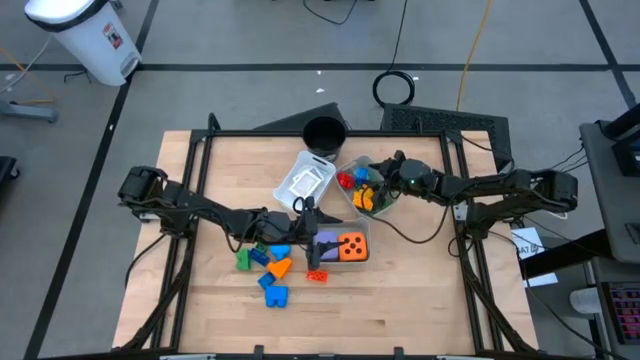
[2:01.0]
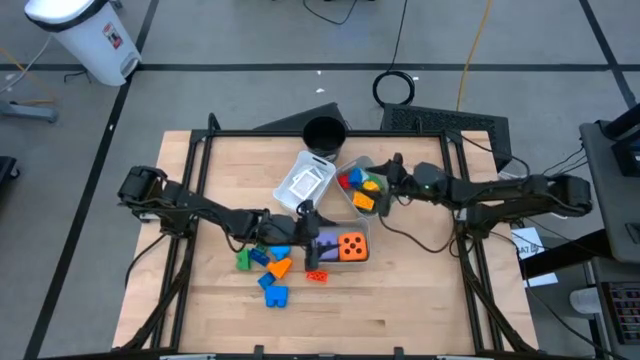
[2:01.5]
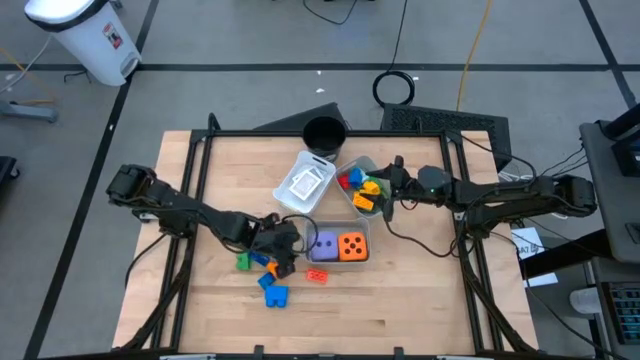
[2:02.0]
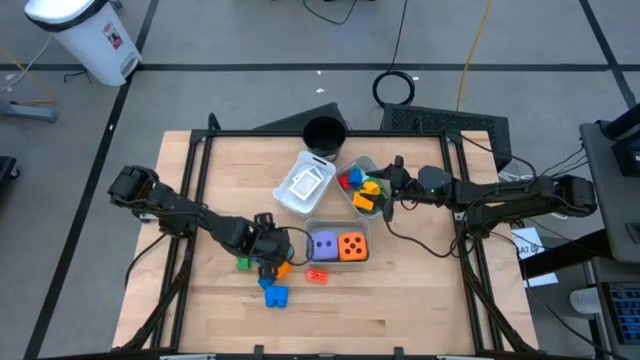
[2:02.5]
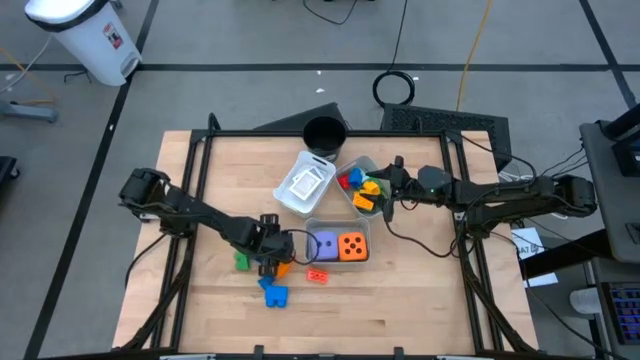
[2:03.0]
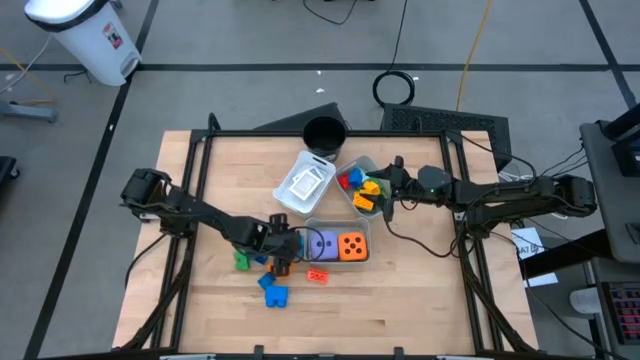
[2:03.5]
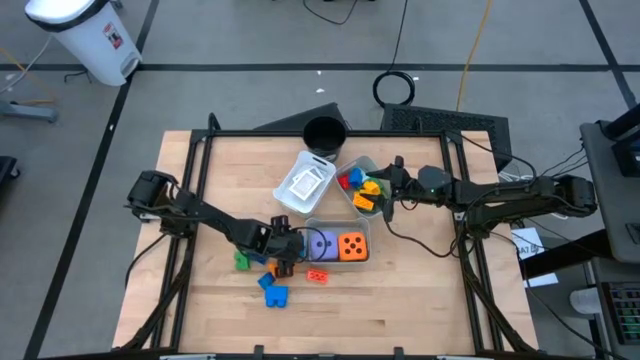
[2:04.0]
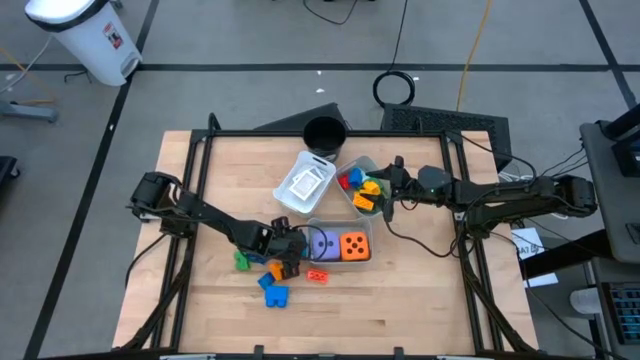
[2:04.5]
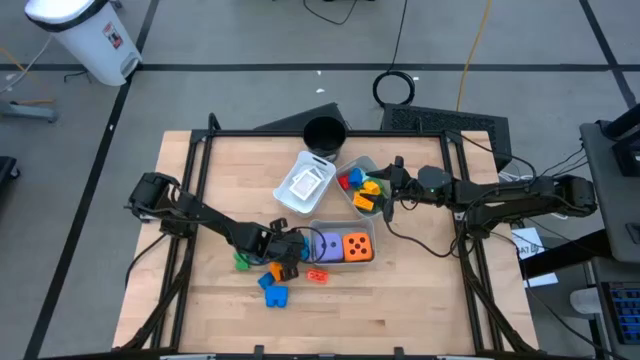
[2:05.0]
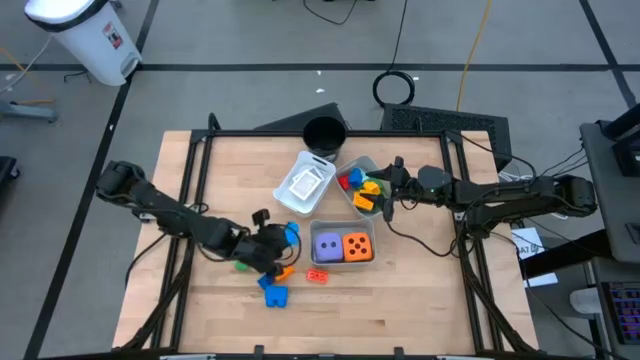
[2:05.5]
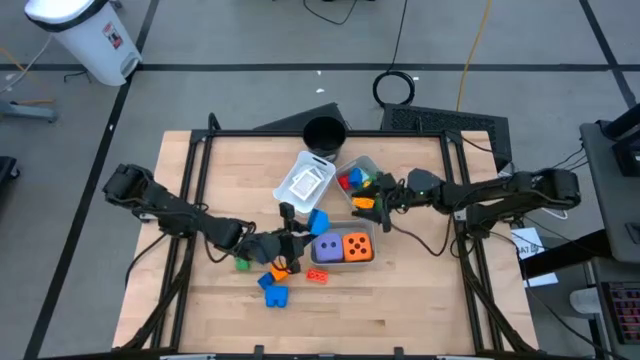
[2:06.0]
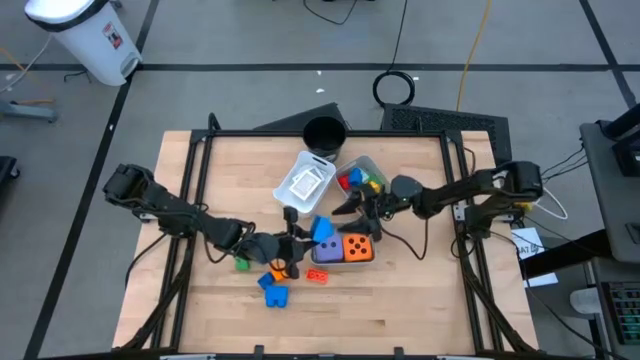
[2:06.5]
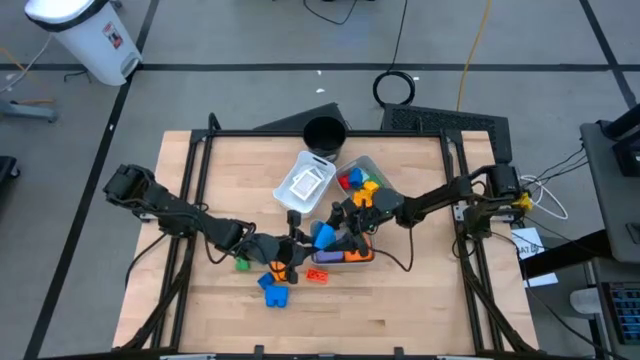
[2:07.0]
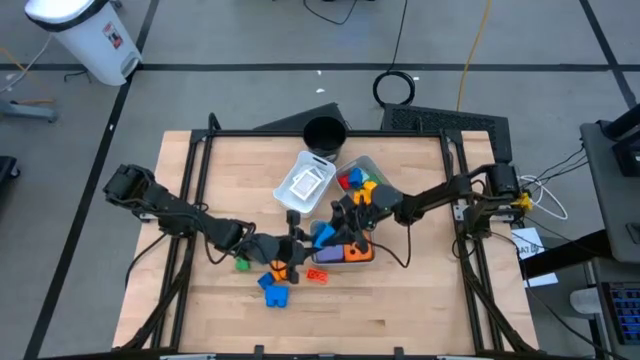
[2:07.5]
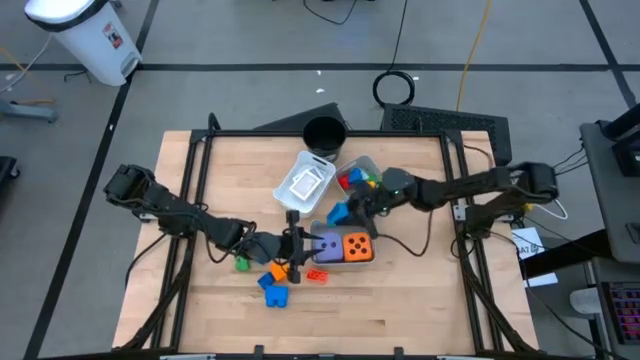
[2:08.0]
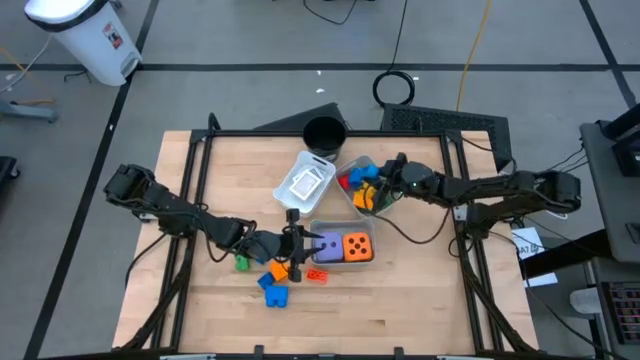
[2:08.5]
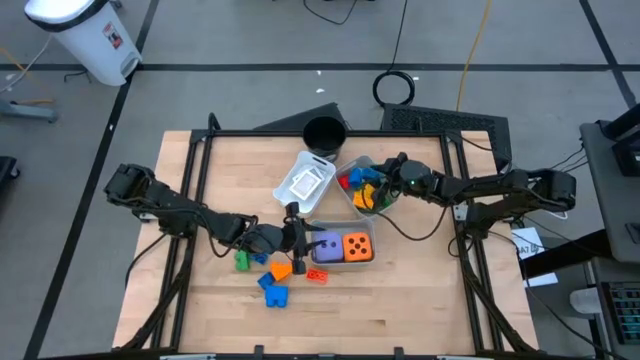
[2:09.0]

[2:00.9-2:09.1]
Task: Pick & Place Toys
Put the blue game piece into the top gray bin

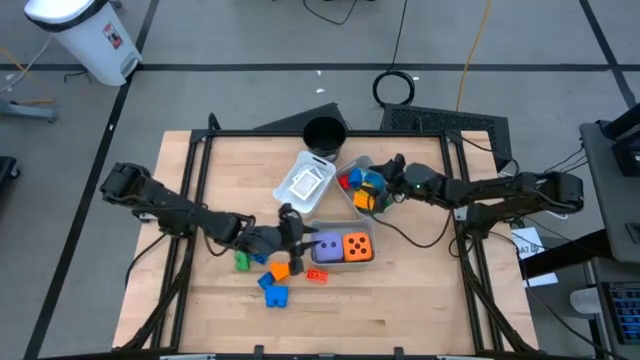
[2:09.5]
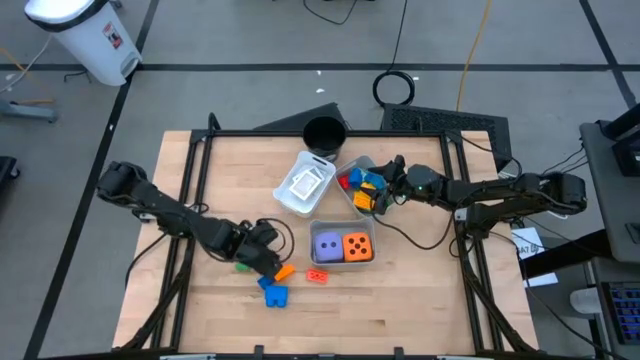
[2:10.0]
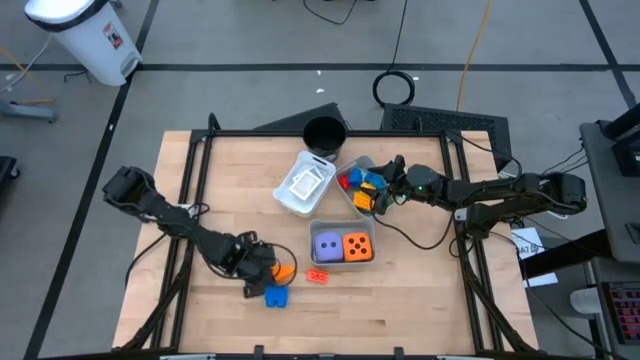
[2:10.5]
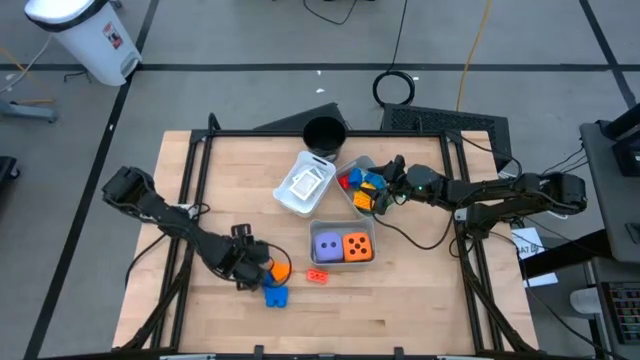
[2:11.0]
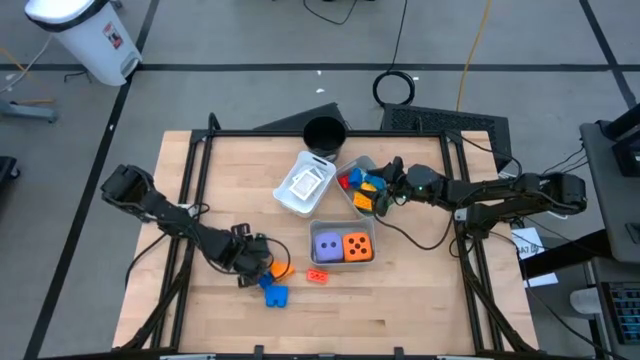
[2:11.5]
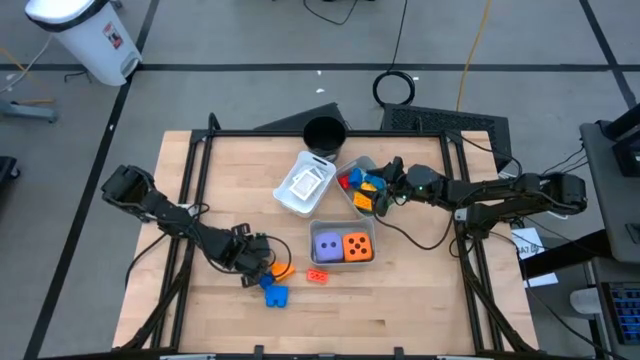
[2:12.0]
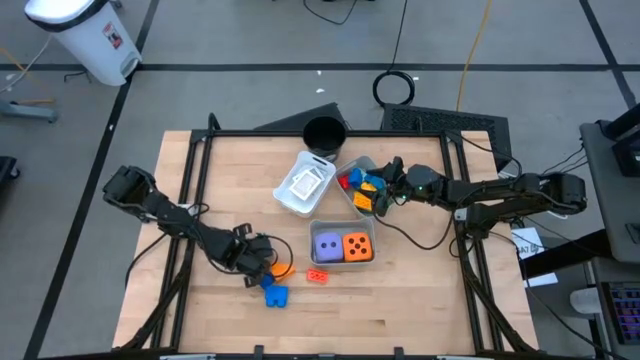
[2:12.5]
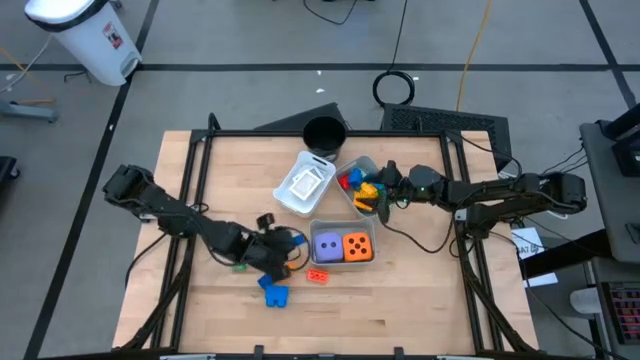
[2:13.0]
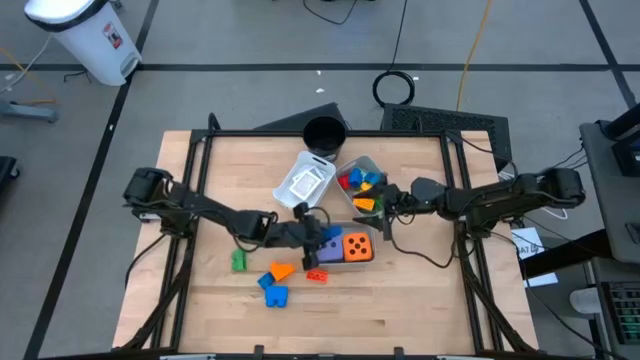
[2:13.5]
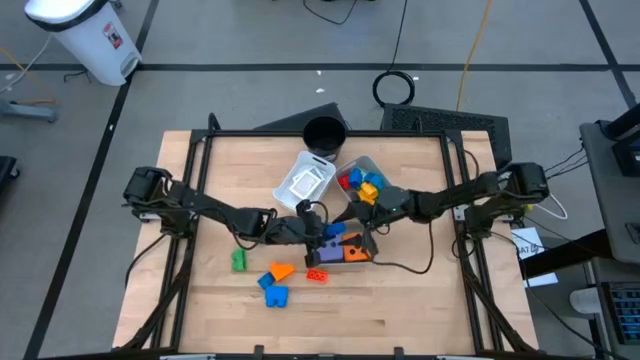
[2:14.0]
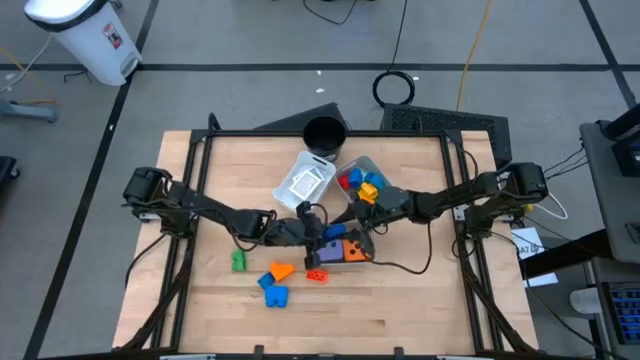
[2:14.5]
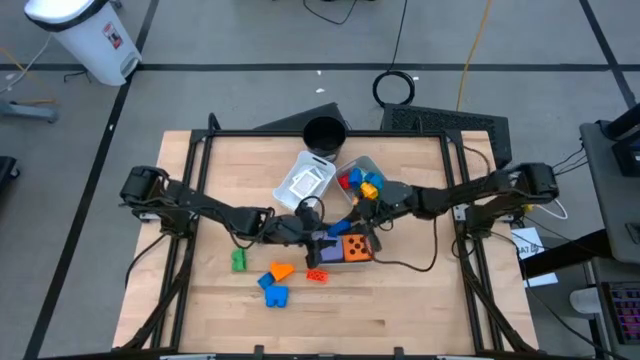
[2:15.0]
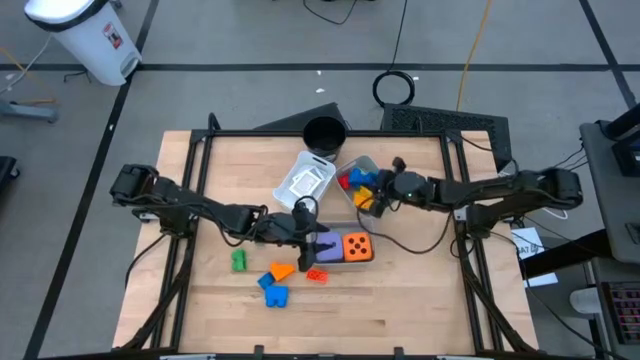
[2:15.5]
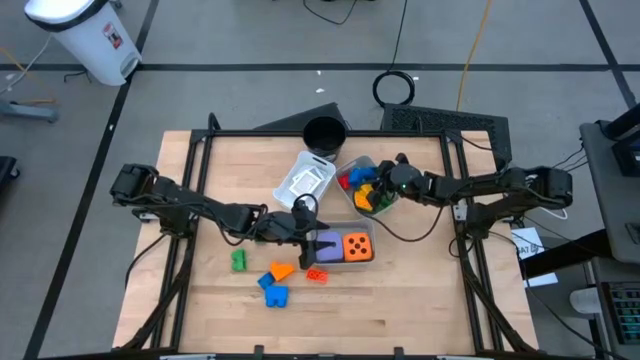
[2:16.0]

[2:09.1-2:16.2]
Put the dark blue game piece into the top gray bin

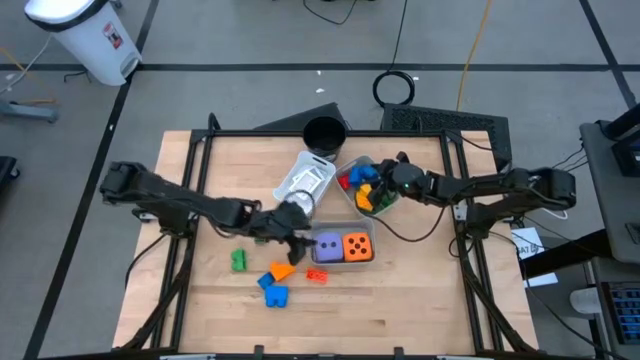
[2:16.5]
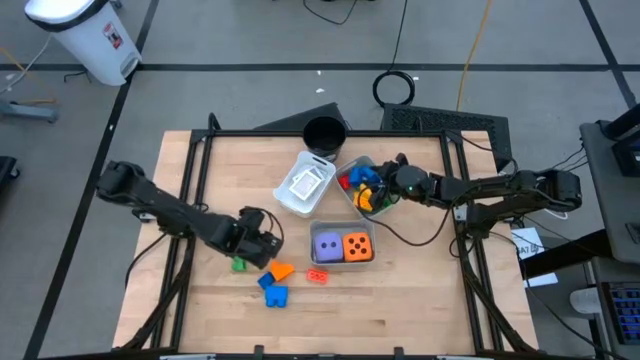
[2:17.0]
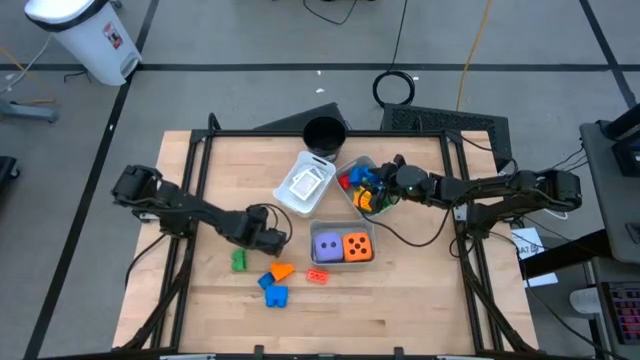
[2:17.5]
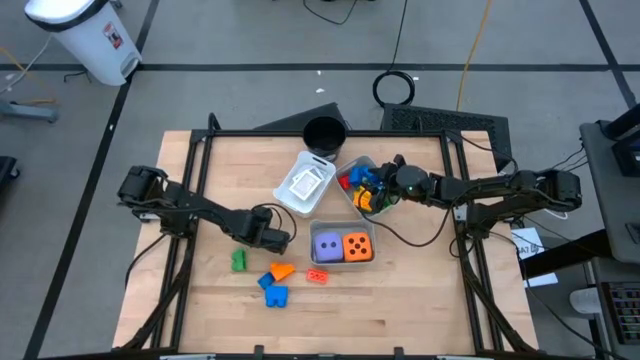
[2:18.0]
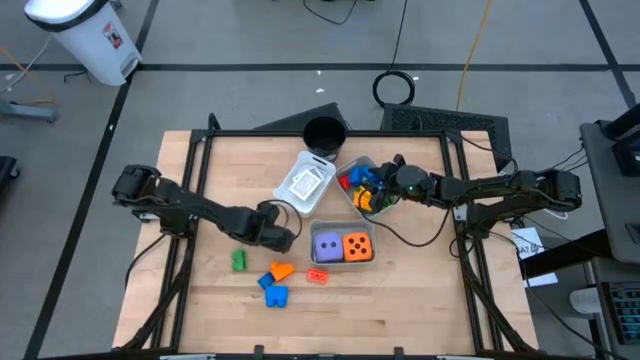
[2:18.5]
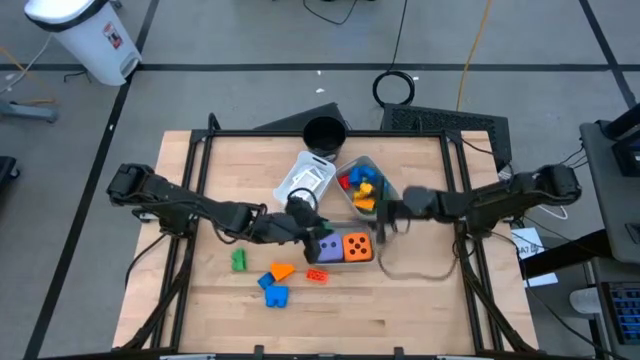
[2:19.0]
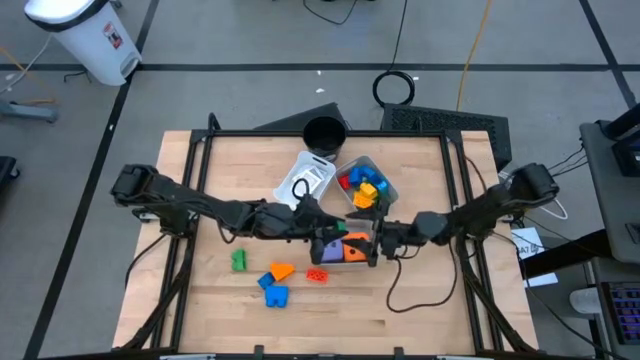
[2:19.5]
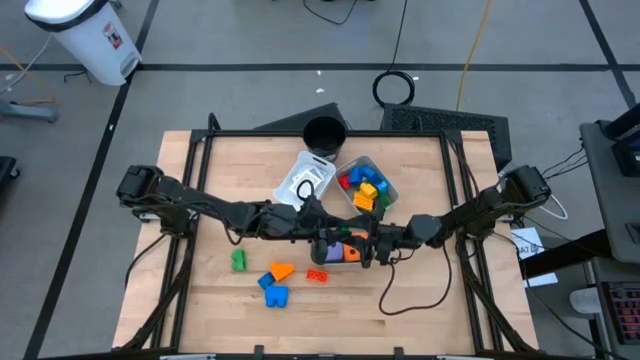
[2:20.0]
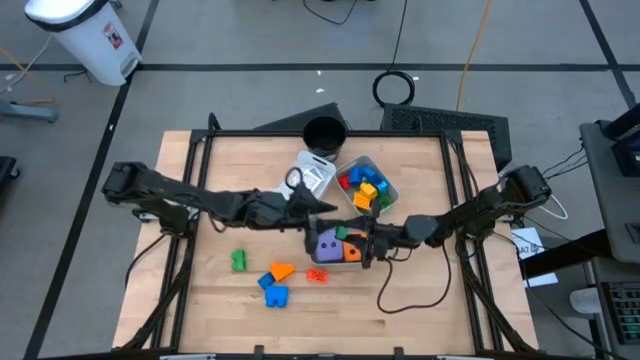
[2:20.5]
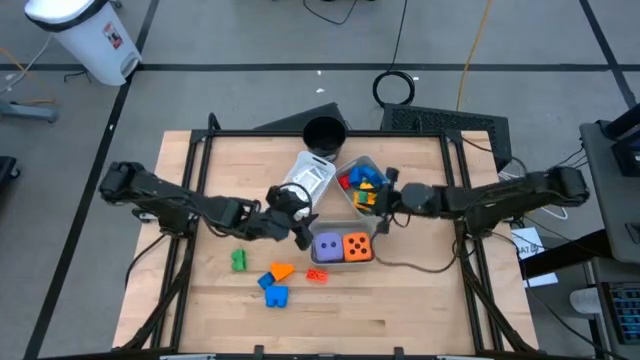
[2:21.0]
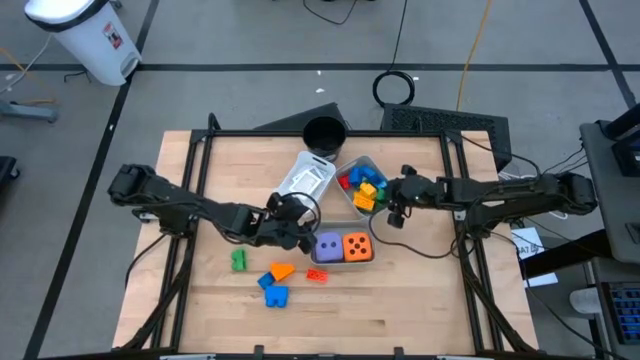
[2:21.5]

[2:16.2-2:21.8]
Put the green game piece into the top gray bin

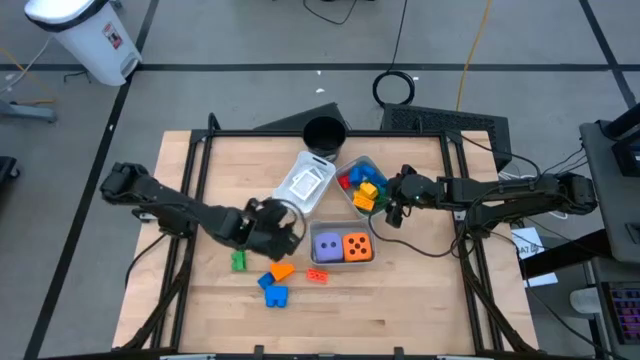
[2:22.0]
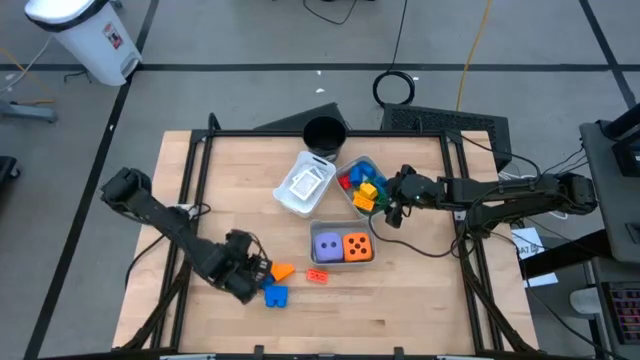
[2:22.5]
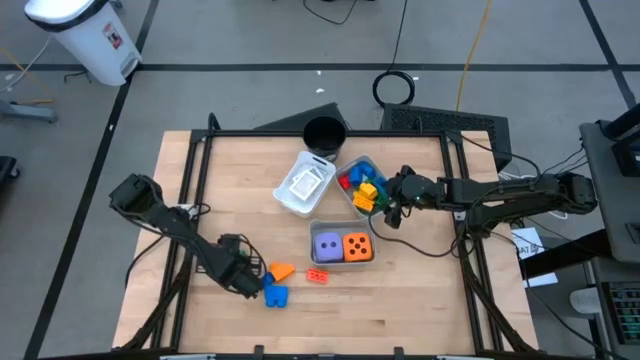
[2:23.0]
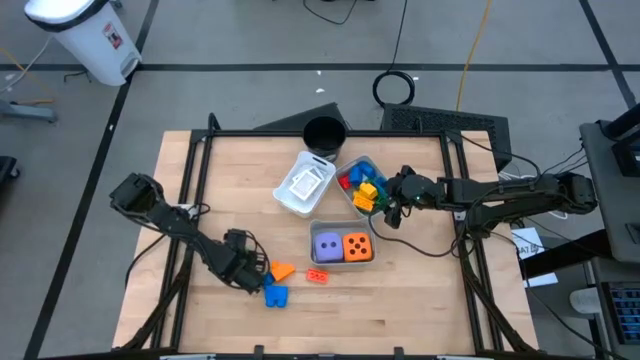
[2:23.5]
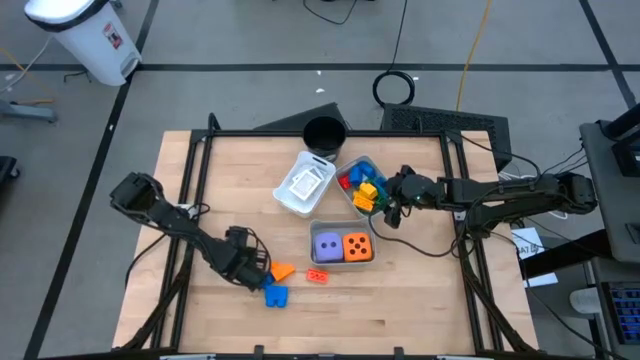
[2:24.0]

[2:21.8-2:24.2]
Put the green game piece into the top gray bin
